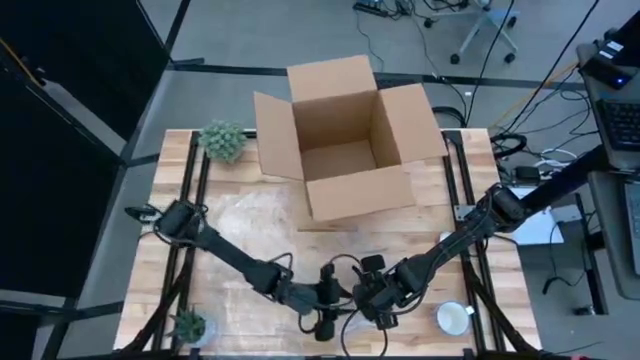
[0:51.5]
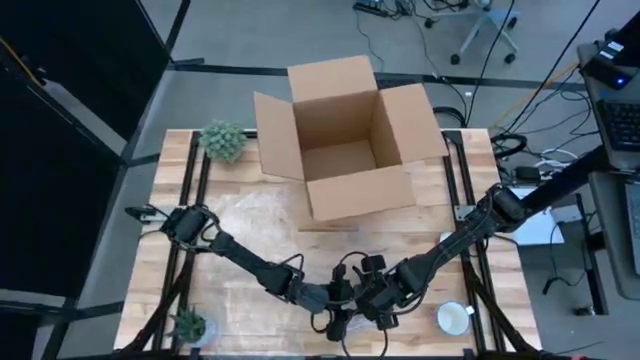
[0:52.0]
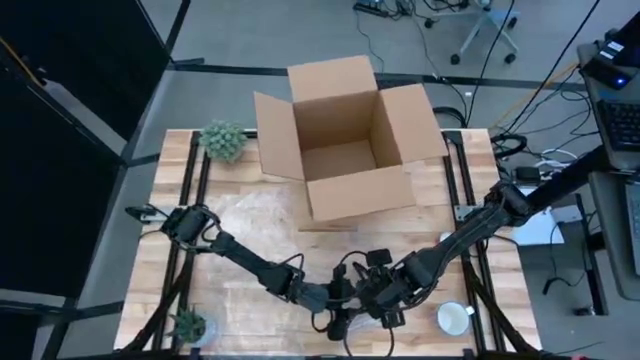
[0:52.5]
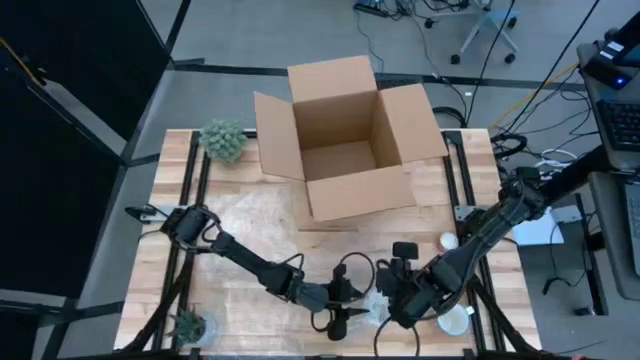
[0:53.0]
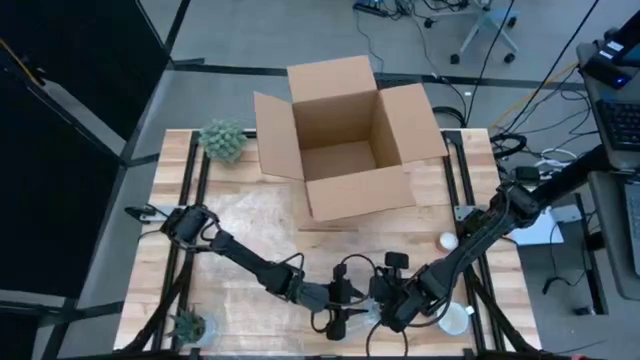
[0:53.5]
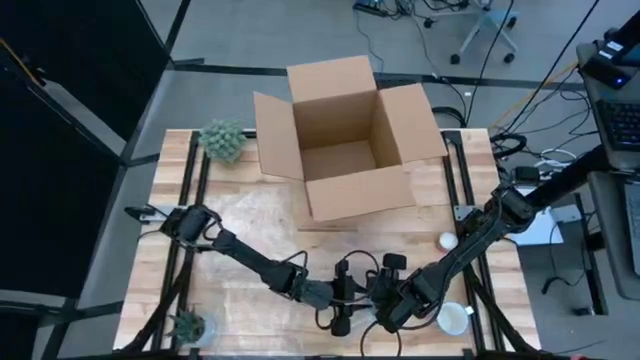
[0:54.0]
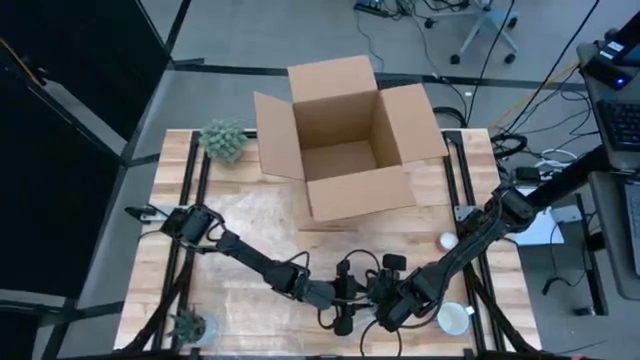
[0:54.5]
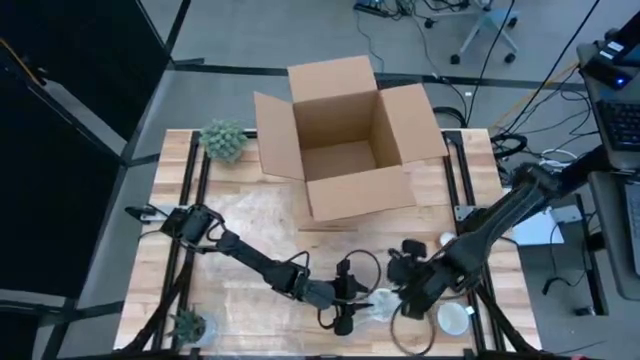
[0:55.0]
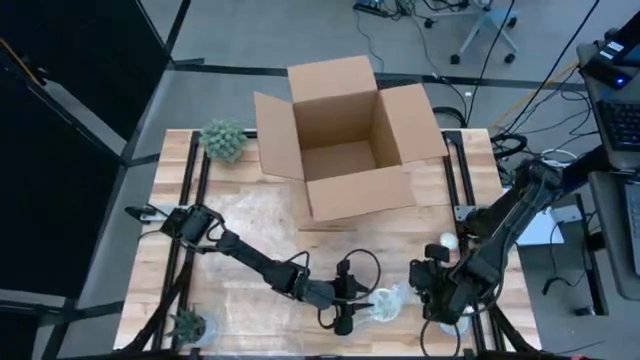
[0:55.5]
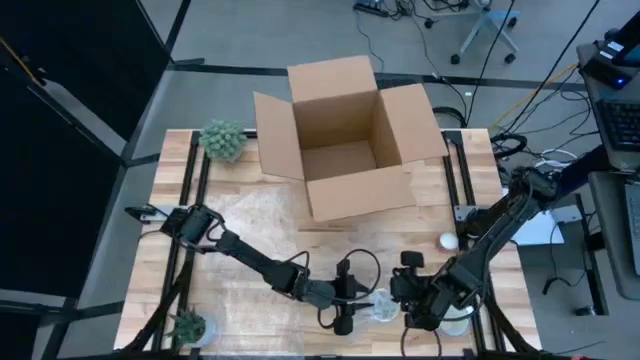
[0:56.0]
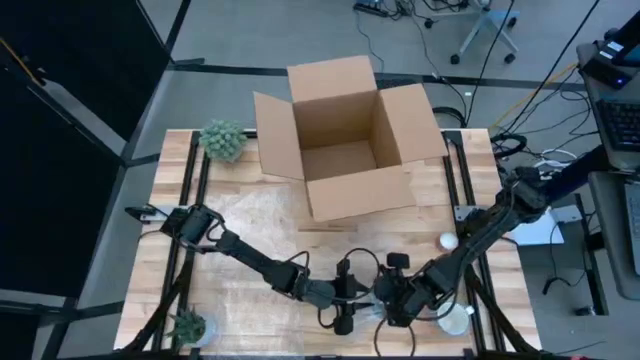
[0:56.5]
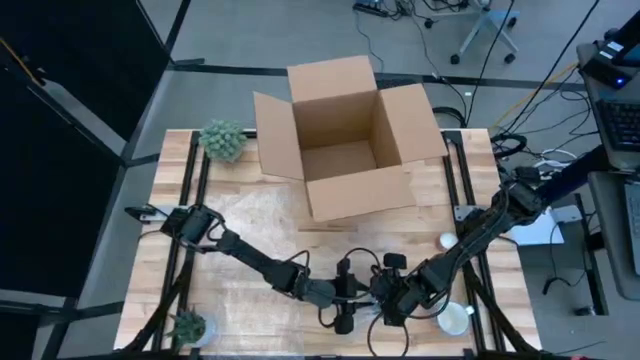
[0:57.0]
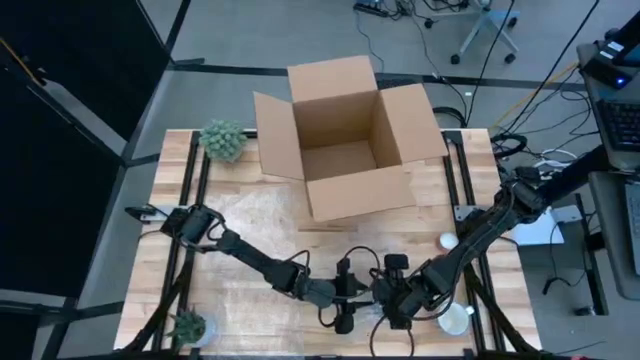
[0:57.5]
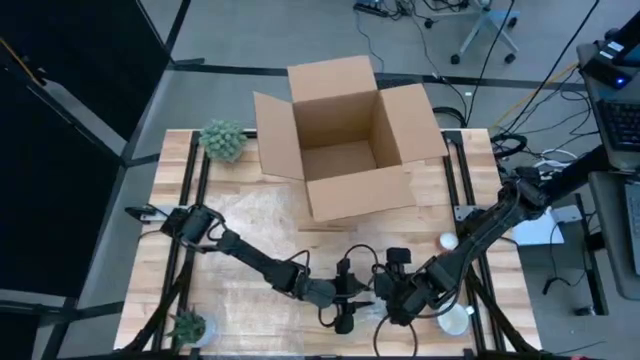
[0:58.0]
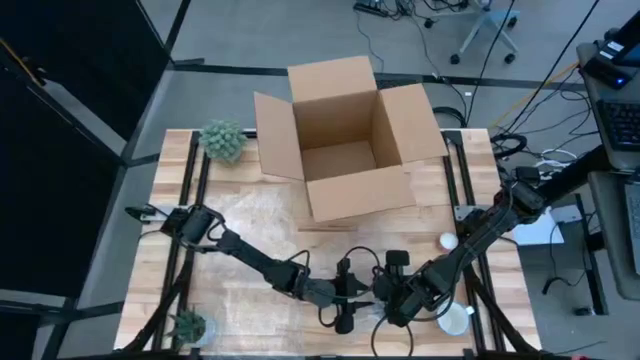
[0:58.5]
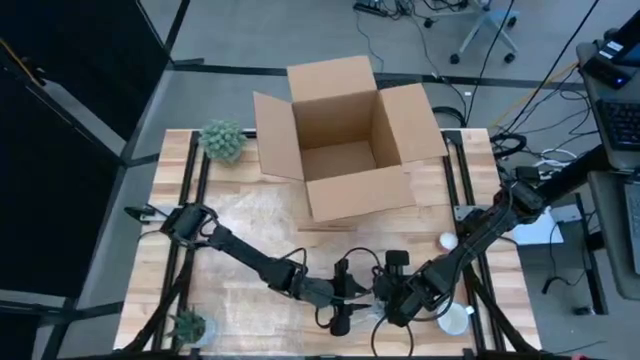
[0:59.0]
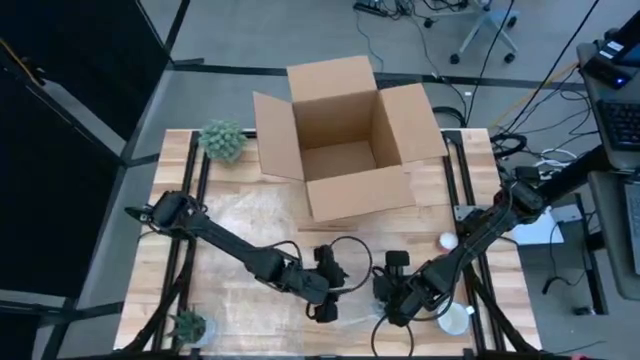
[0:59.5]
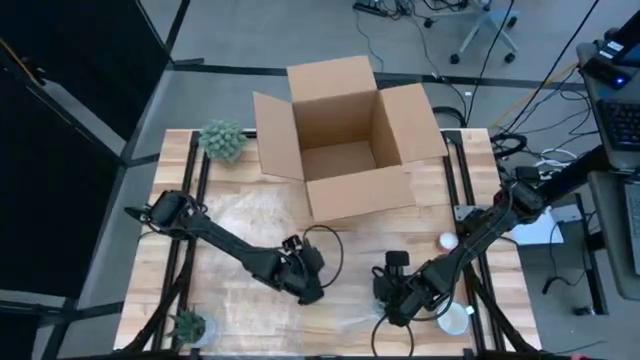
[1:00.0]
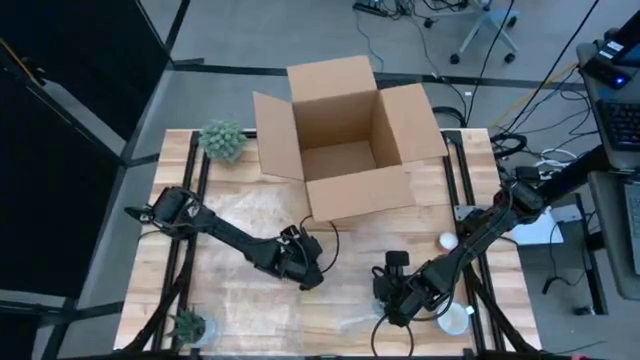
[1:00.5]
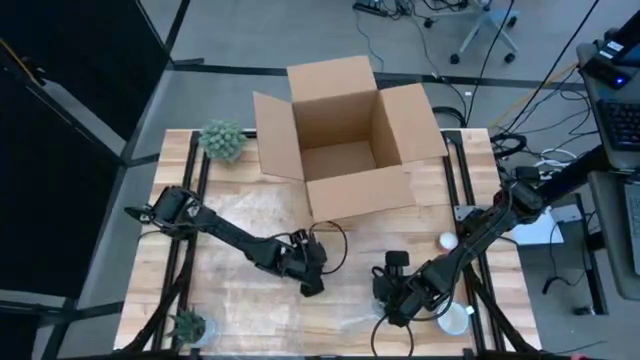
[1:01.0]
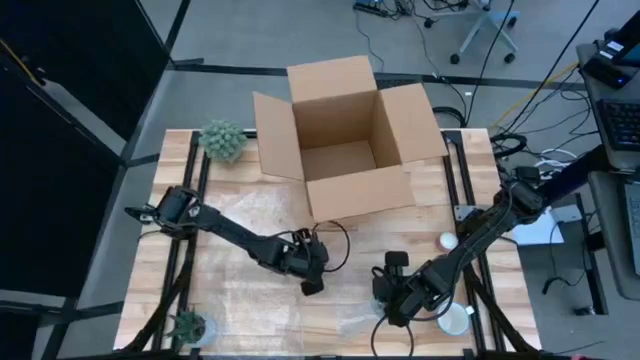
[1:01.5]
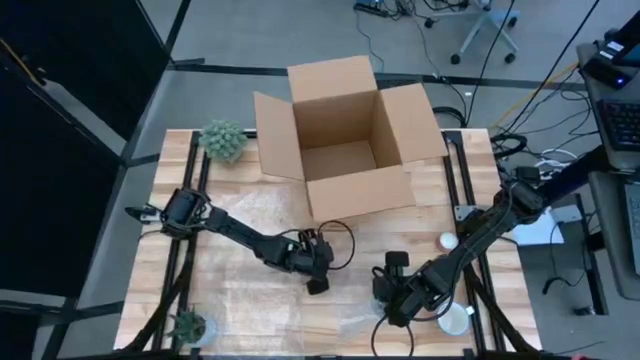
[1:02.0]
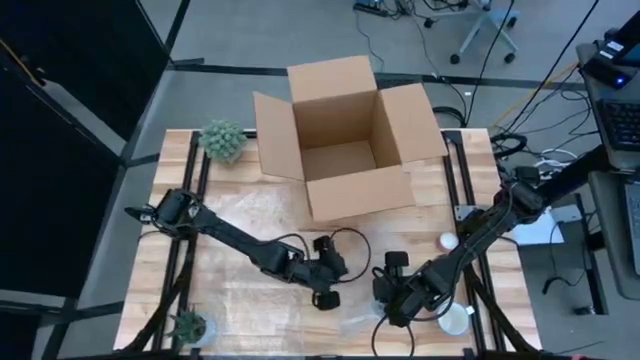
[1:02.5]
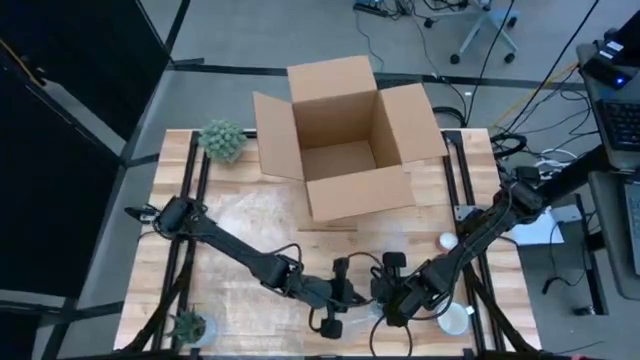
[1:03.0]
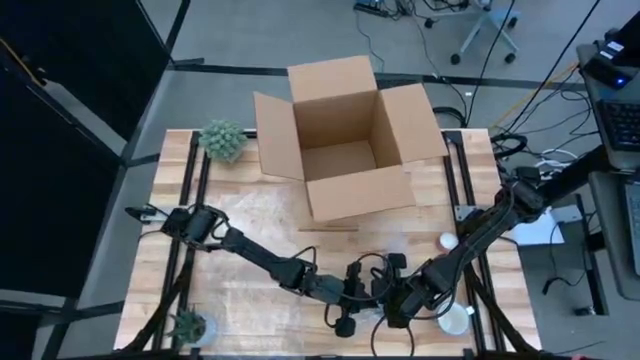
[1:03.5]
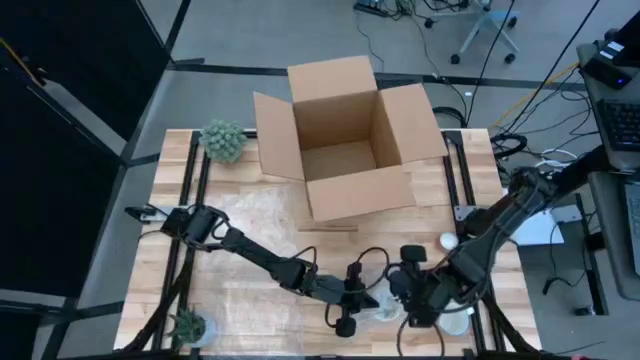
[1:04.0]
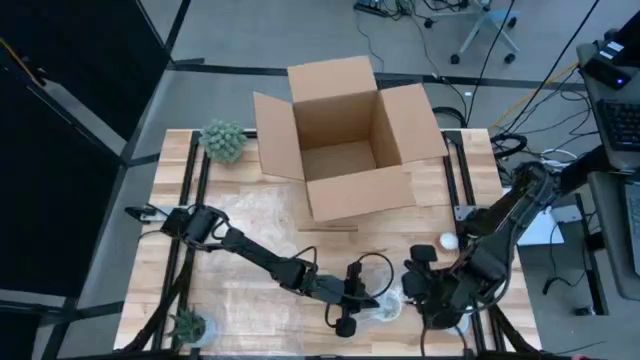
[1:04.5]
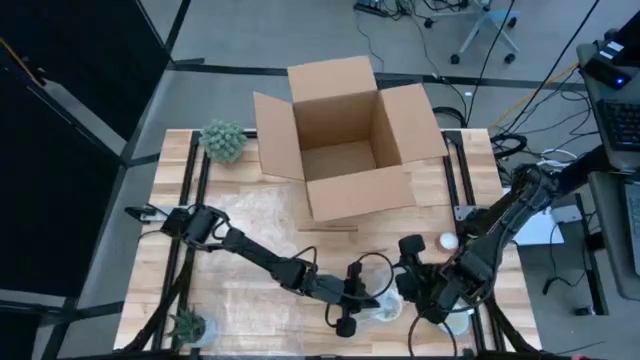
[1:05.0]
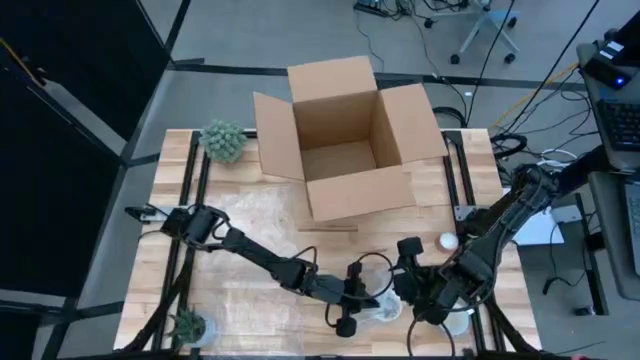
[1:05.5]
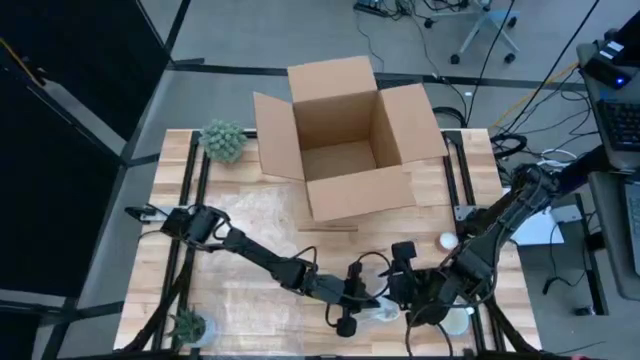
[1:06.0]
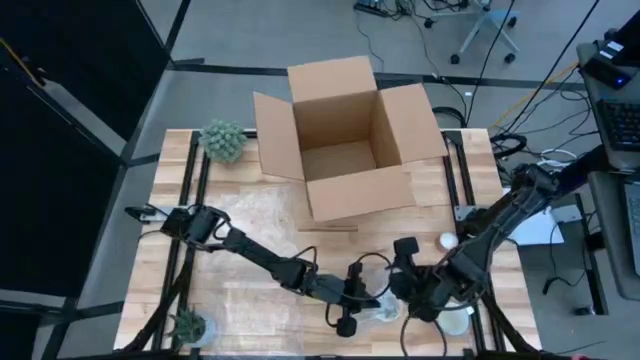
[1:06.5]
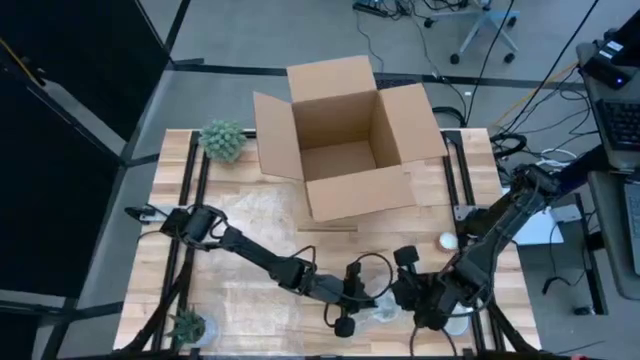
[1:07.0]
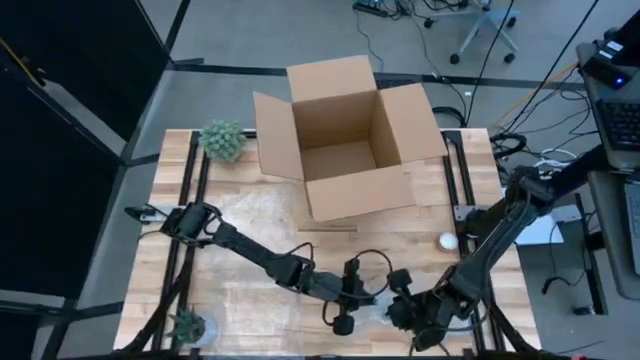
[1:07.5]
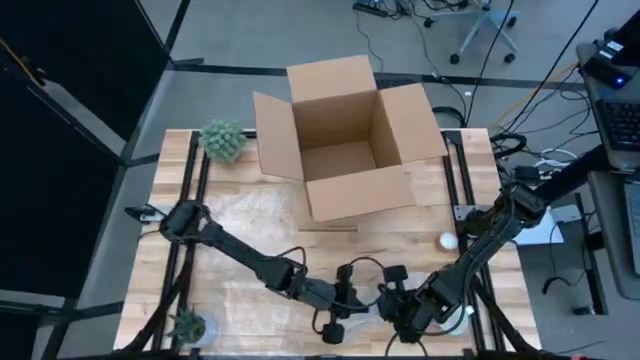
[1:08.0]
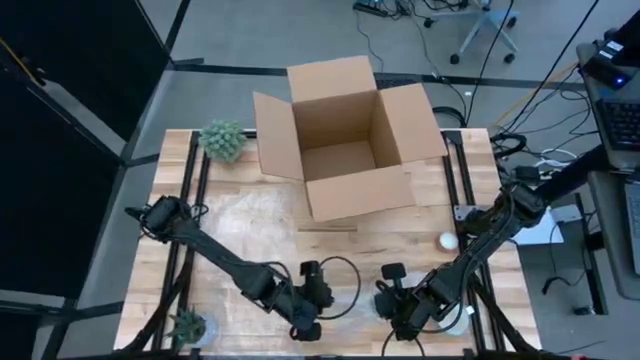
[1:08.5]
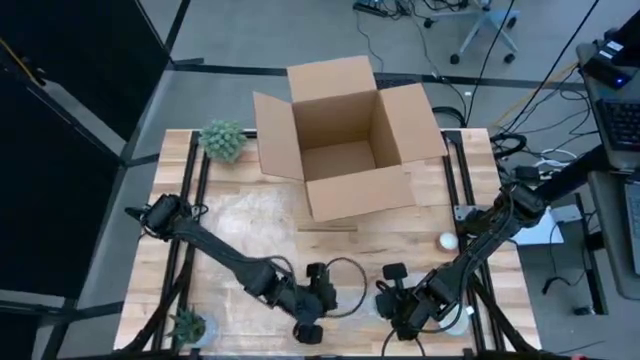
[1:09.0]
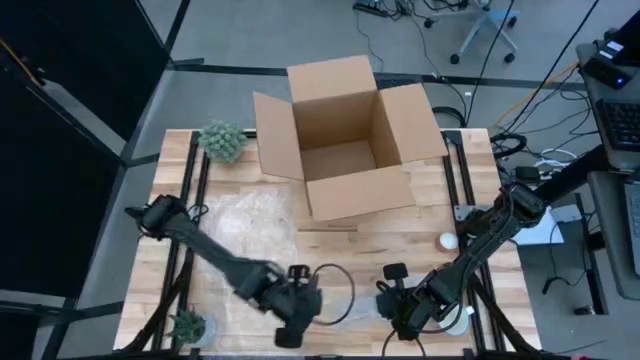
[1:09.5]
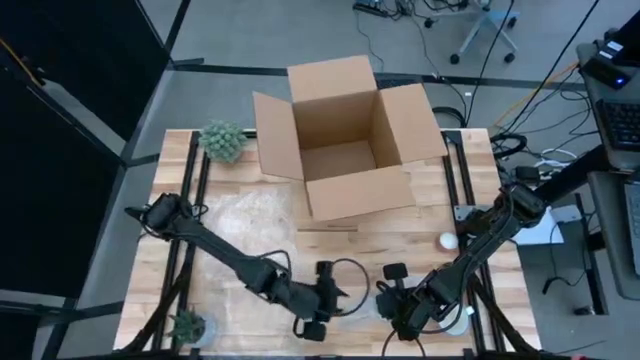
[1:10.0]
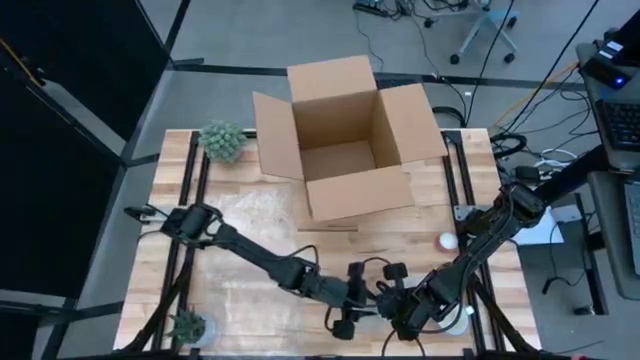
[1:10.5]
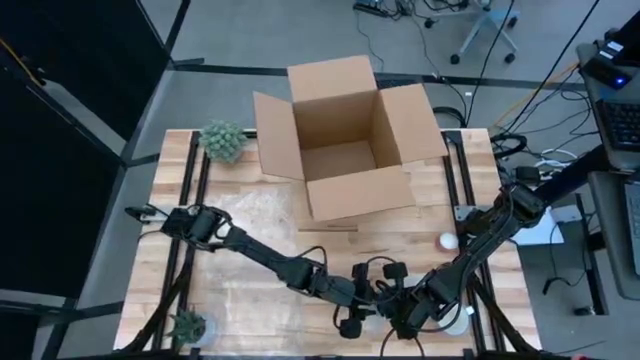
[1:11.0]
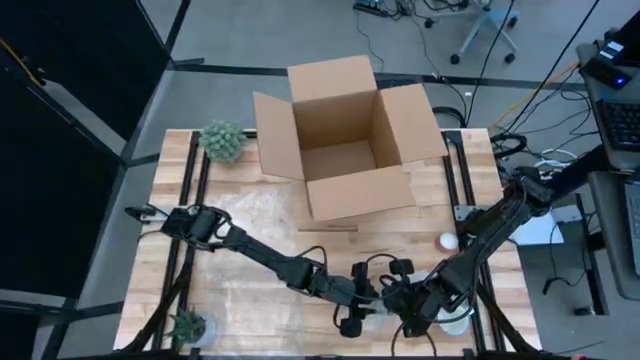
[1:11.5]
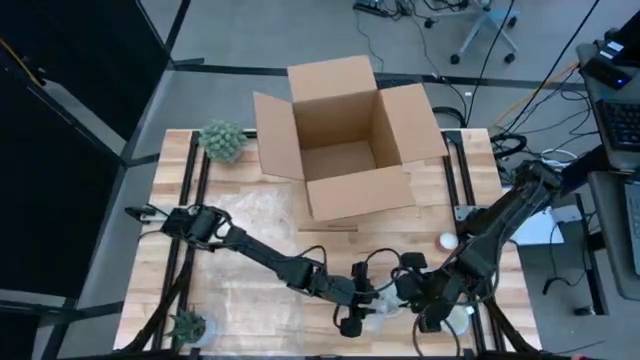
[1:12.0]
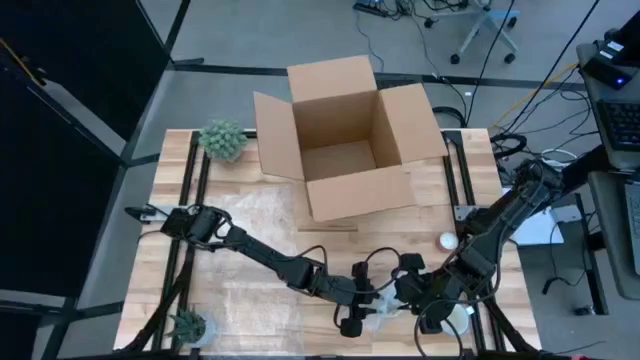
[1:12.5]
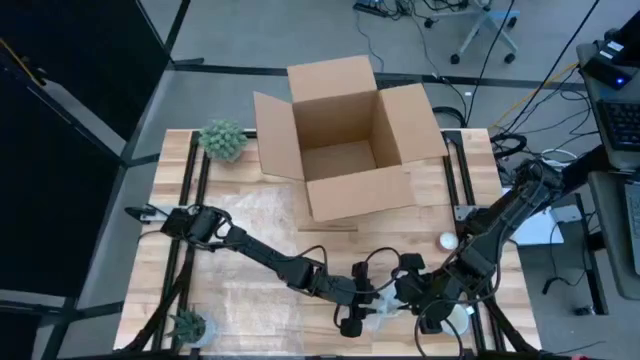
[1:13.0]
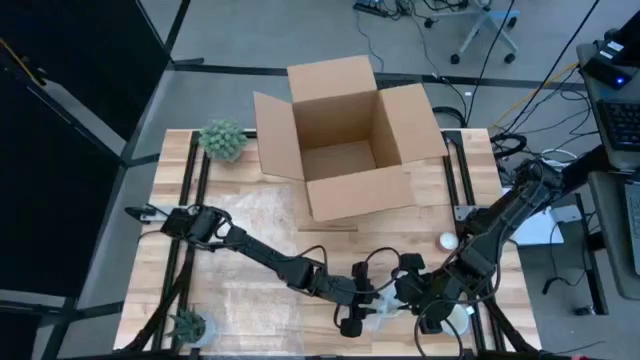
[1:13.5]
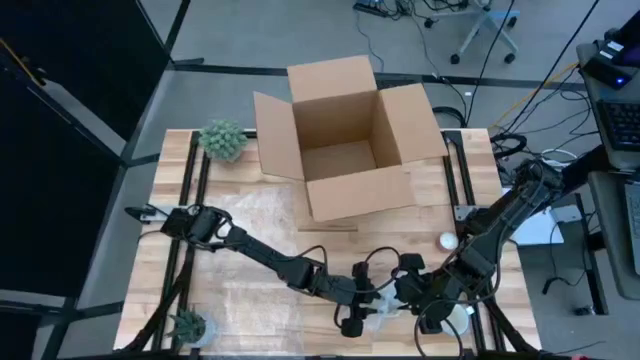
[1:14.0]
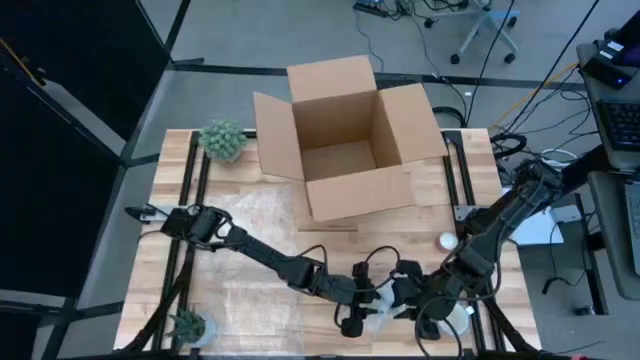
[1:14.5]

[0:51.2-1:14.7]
Task: wrap mug
Wrap the orange mug with bubble wrap
